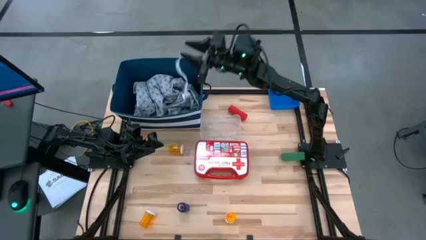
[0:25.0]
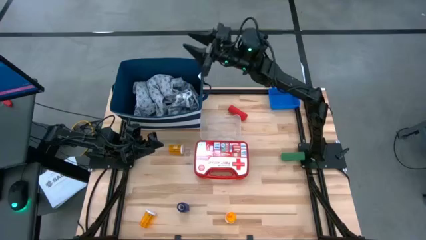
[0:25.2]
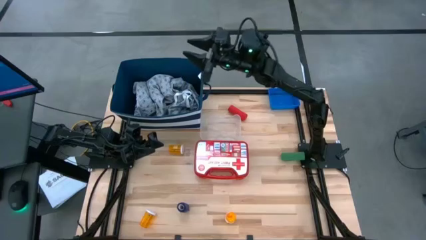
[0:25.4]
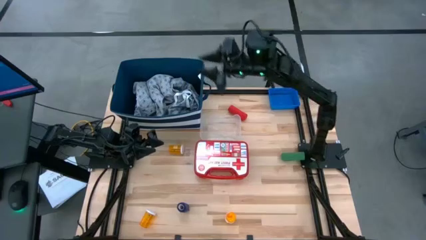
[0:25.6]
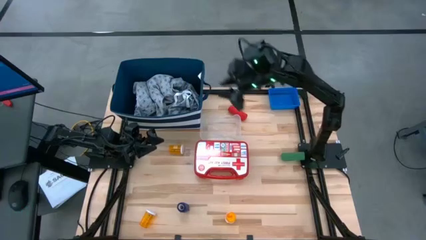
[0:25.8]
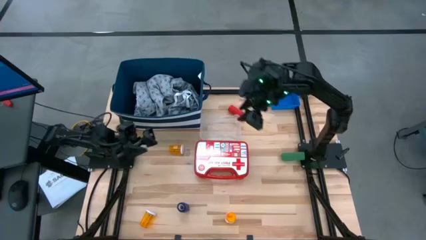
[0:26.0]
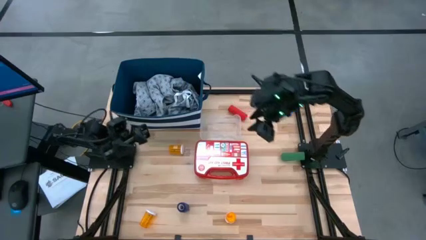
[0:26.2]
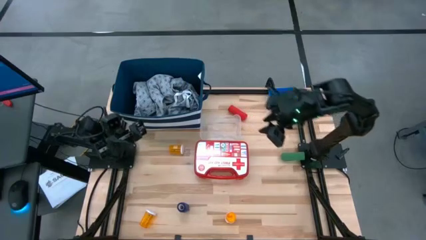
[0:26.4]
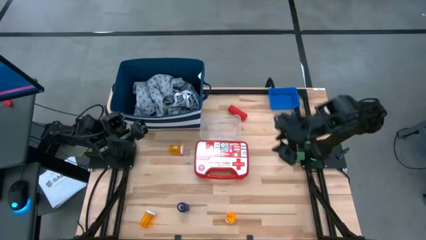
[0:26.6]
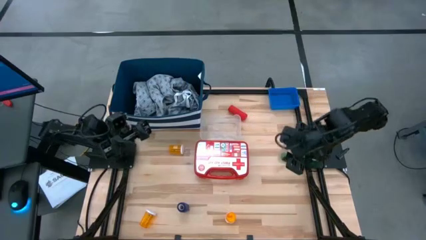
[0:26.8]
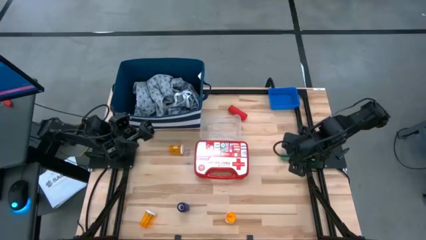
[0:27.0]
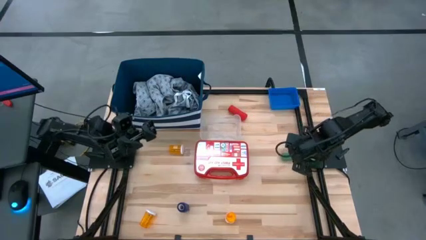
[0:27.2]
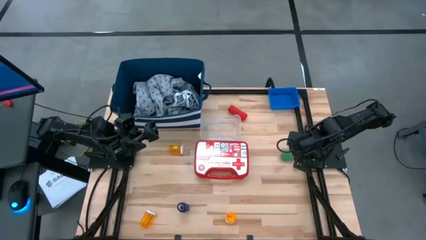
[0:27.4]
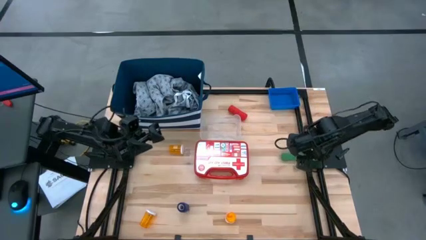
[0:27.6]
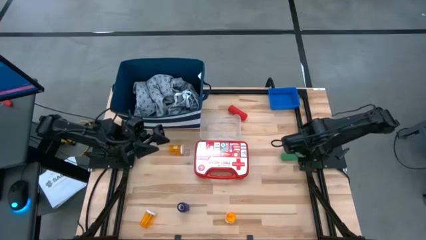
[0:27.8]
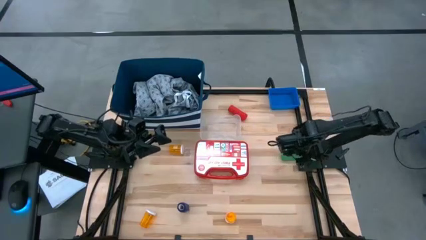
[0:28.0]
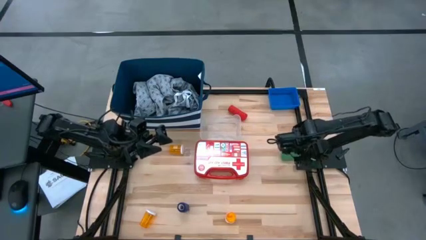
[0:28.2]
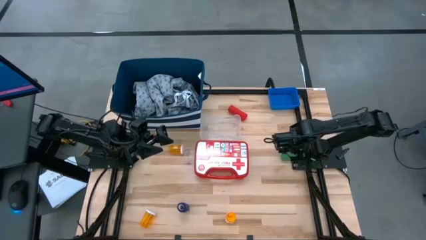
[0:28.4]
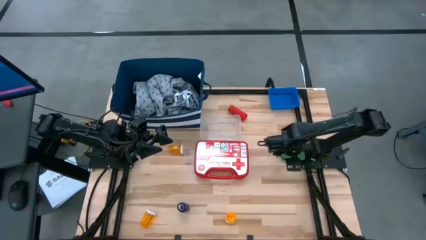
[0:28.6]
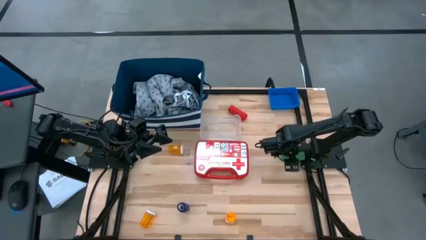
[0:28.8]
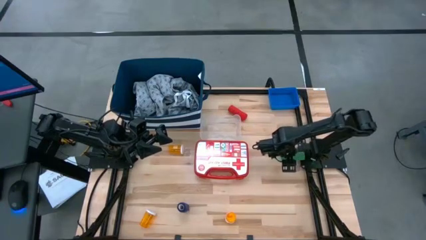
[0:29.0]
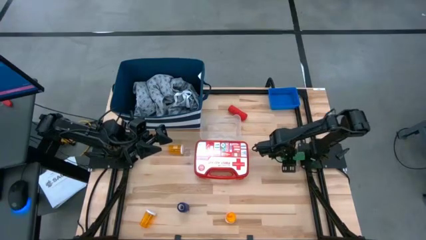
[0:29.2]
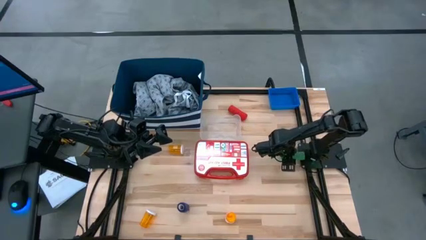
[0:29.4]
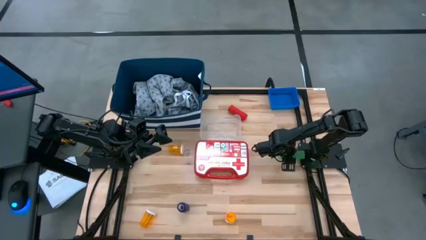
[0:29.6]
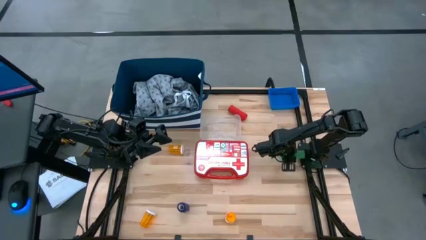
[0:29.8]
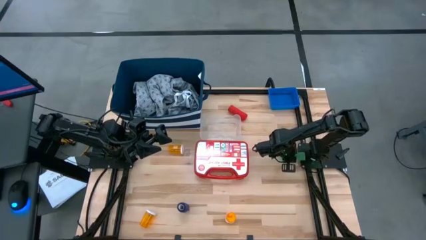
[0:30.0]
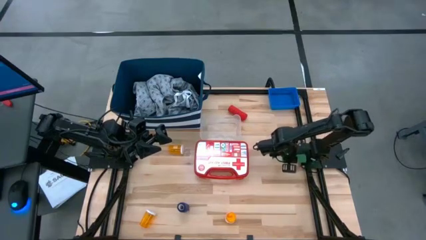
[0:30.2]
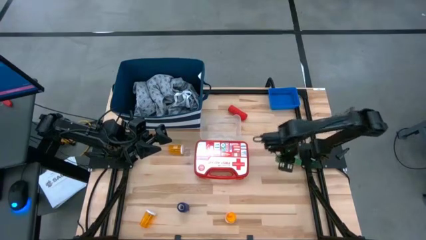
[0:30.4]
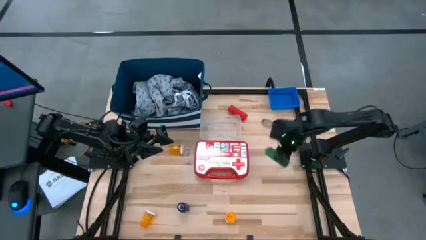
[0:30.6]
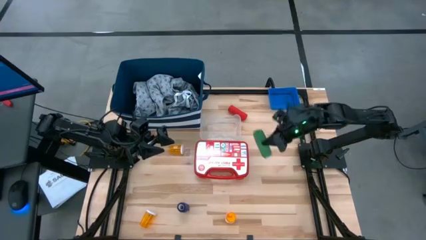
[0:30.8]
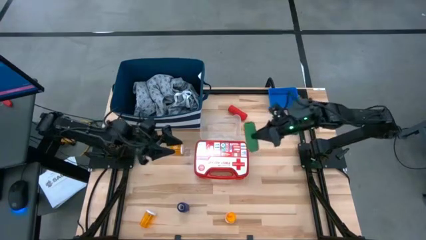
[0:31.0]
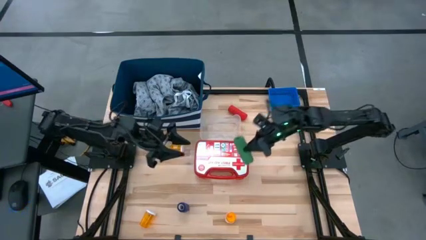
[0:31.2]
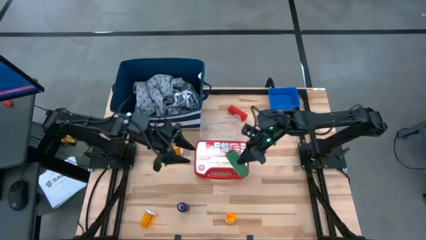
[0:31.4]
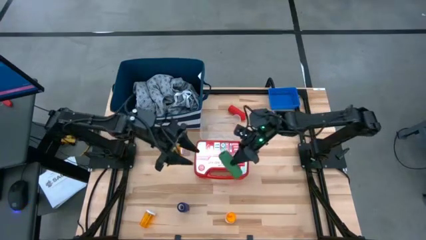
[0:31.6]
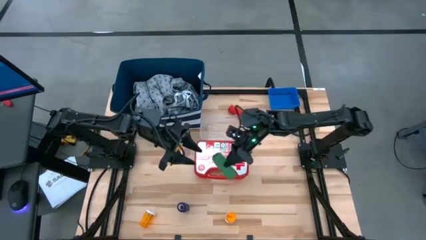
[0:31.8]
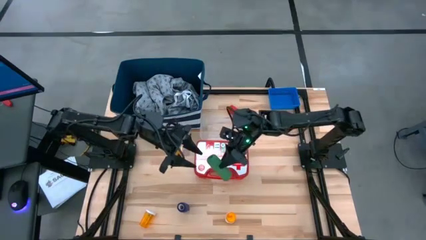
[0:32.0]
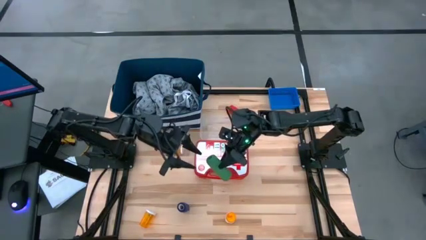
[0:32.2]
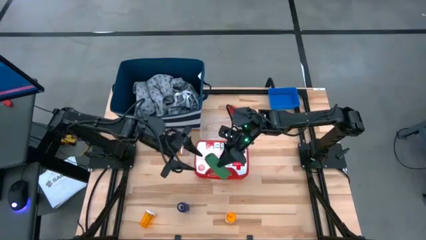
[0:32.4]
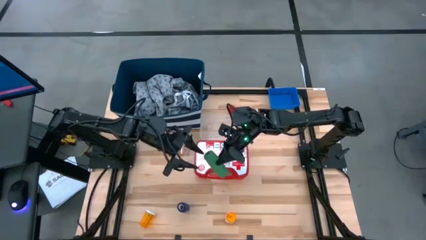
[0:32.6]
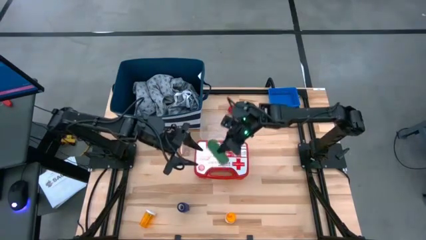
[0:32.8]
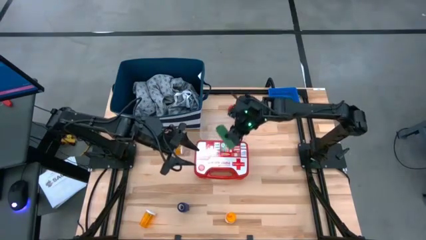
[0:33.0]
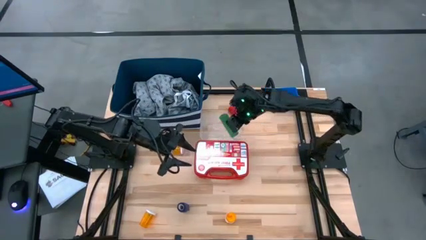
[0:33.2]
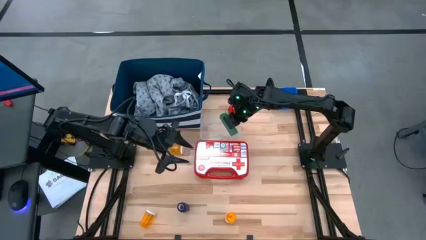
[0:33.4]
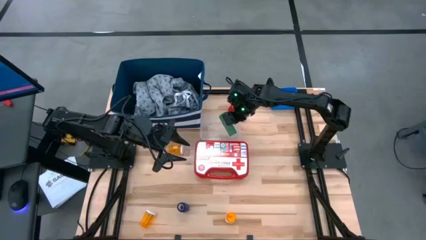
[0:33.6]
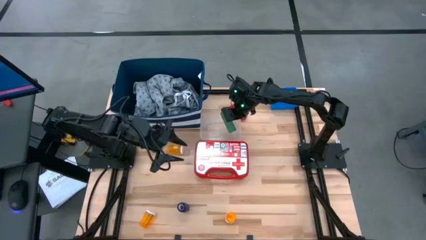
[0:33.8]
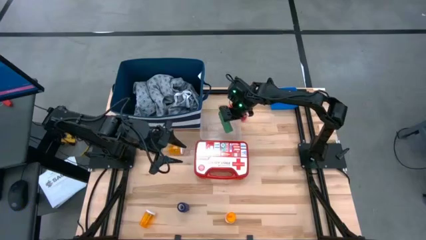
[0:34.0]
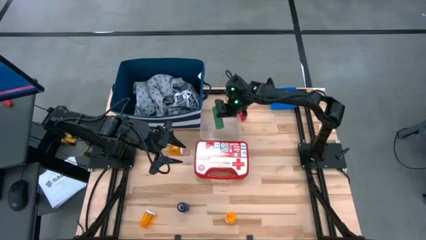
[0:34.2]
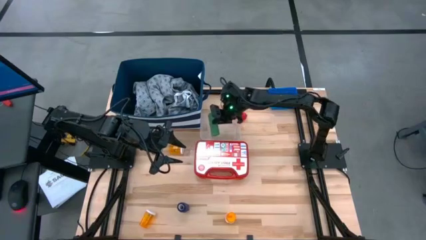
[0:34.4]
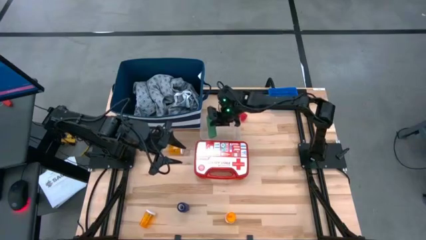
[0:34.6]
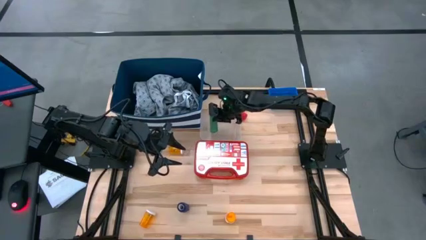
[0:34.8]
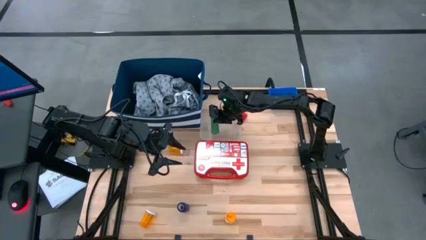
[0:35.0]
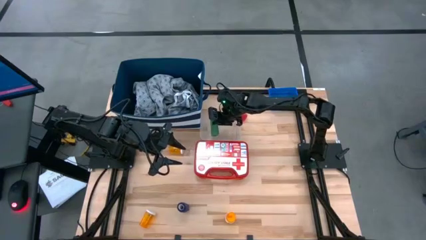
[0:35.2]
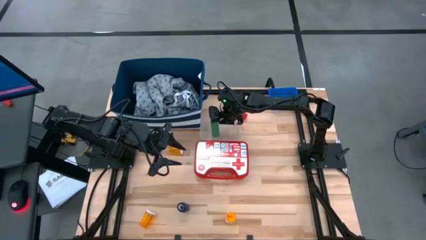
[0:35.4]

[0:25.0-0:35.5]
Task: Pick & place medical supplies in basket/bin
Put the rolled green bandage into the transparent bin

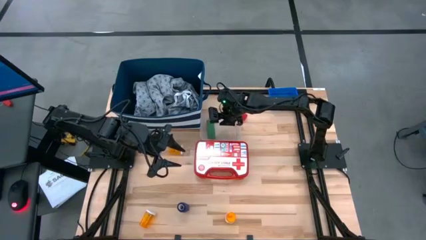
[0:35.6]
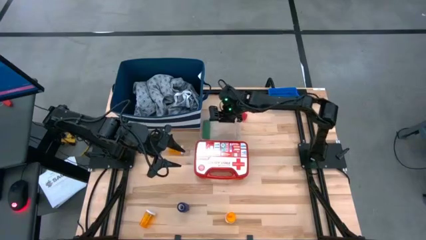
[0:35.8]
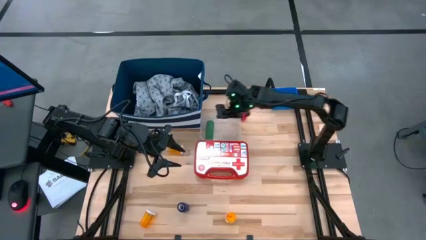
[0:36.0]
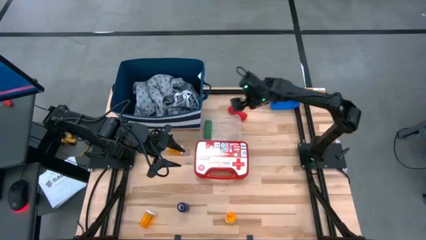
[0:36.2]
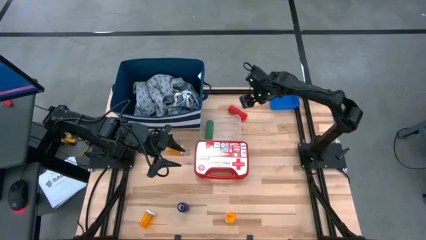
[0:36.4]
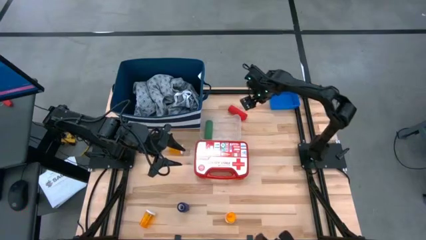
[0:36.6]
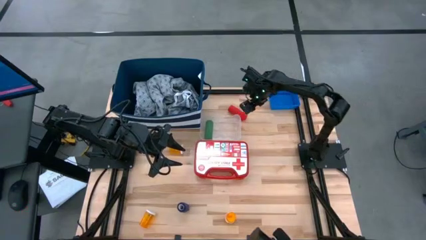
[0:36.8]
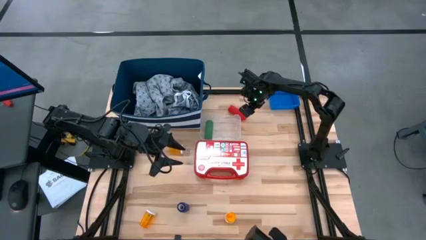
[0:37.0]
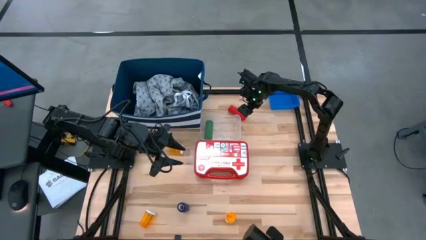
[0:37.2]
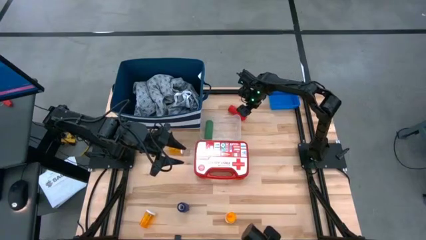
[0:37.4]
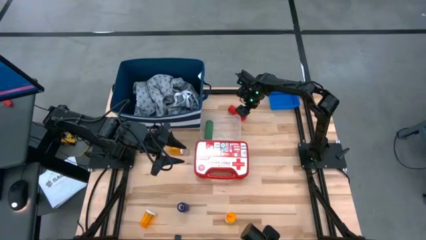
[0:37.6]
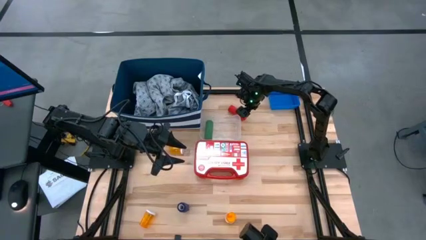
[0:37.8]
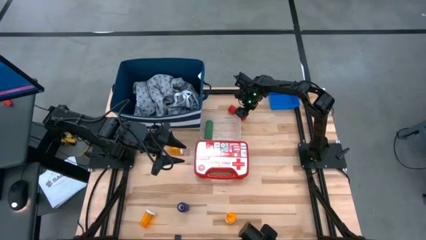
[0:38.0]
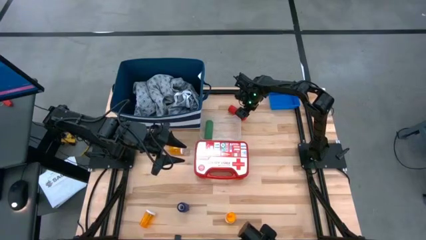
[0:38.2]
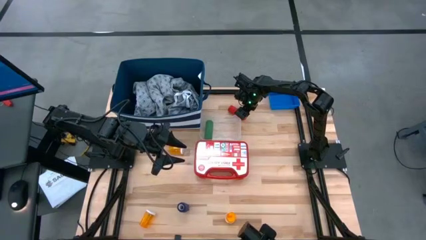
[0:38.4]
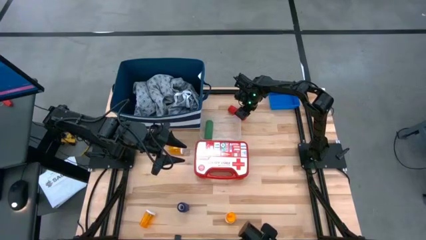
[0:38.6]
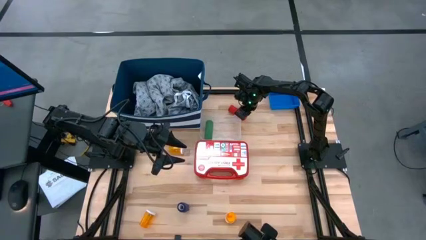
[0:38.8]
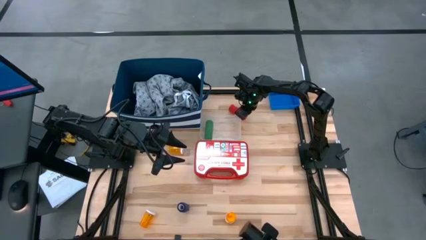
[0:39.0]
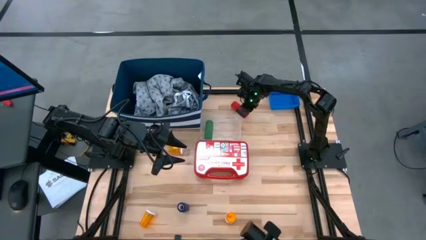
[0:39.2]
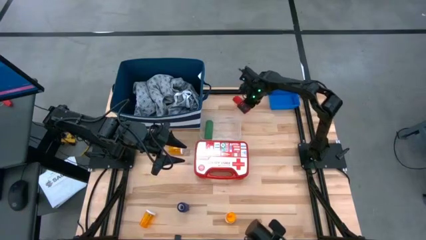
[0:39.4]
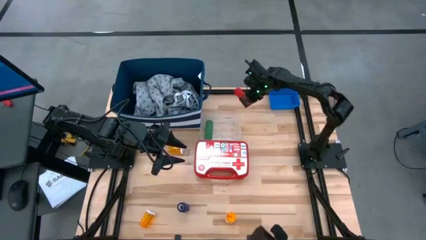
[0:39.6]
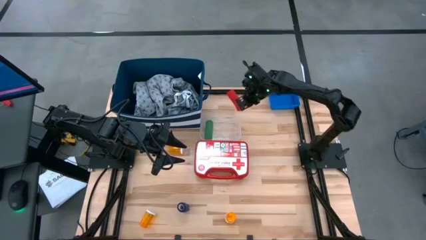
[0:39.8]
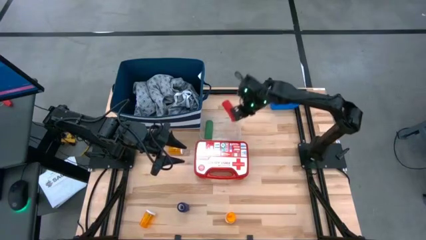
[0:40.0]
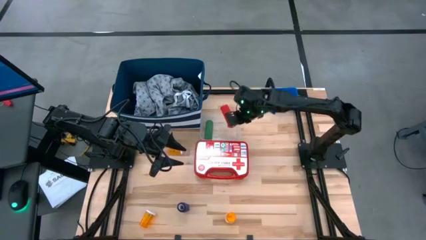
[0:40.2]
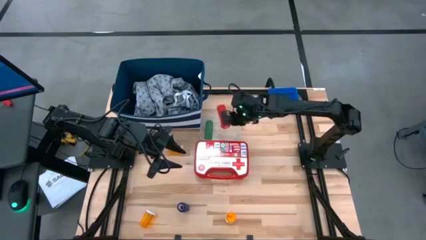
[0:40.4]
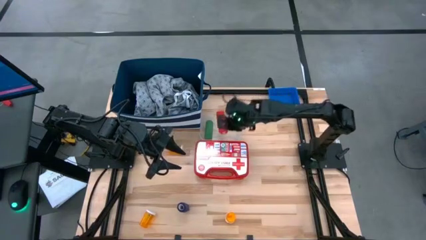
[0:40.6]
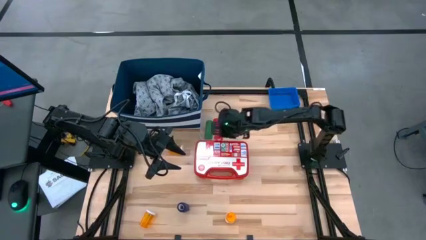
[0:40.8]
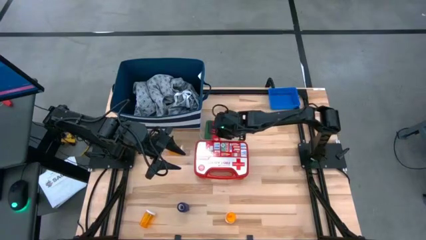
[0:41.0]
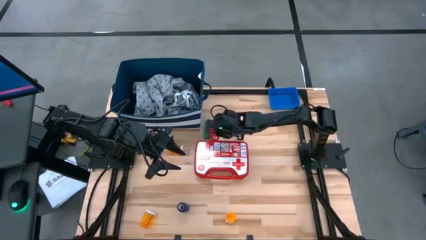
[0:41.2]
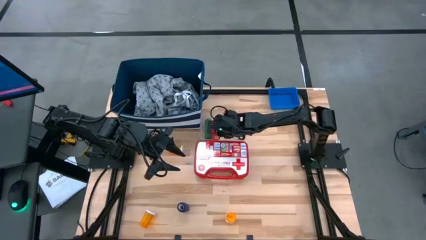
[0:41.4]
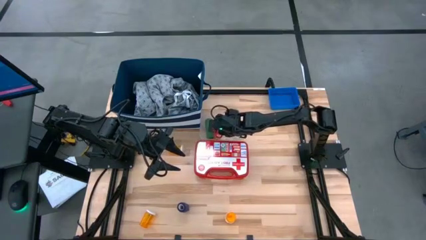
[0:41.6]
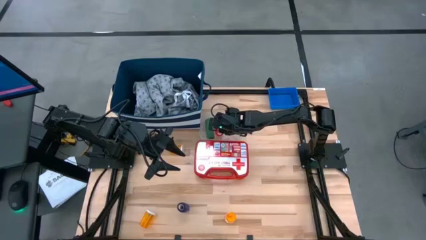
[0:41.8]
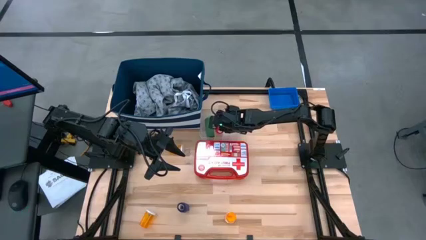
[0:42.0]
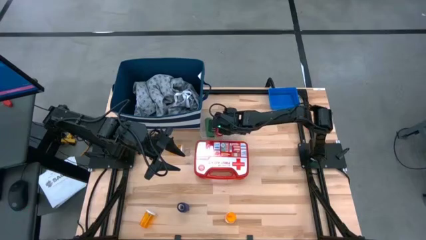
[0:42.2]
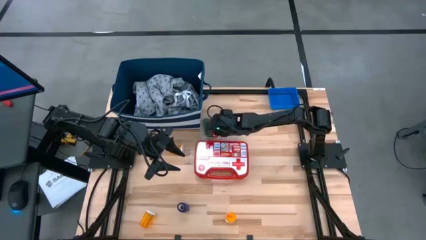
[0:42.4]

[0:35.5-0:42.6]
Put the rolled red bandage into the transparent bin
